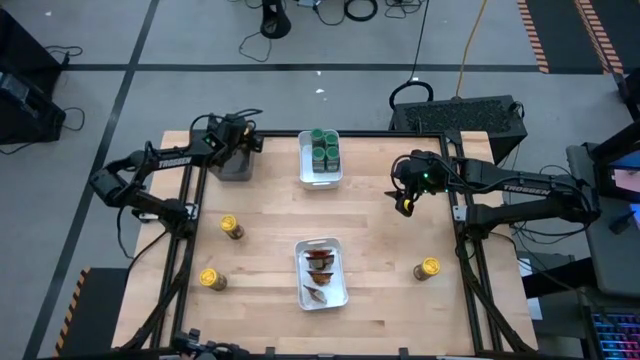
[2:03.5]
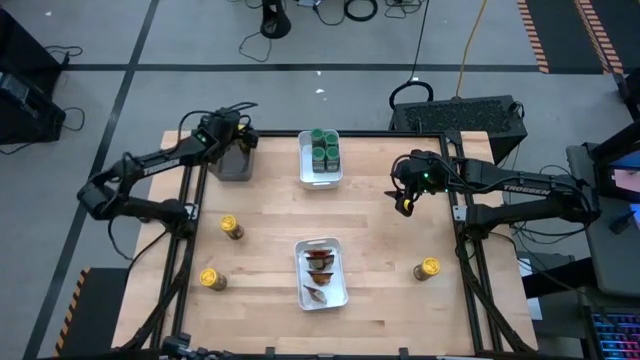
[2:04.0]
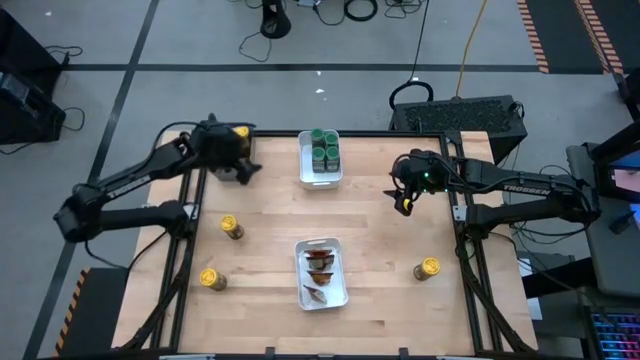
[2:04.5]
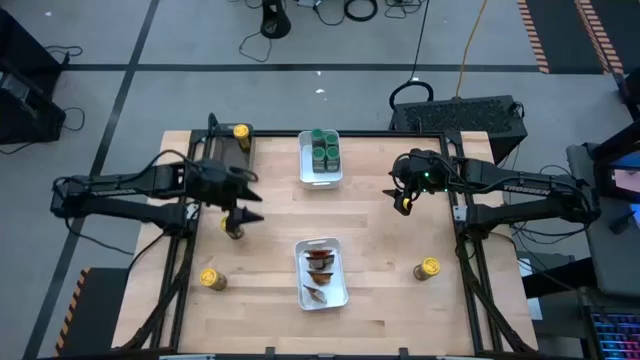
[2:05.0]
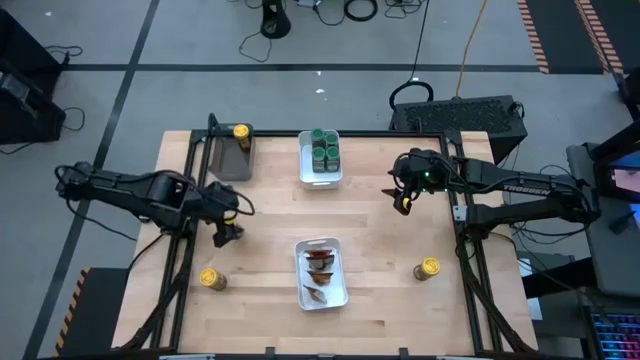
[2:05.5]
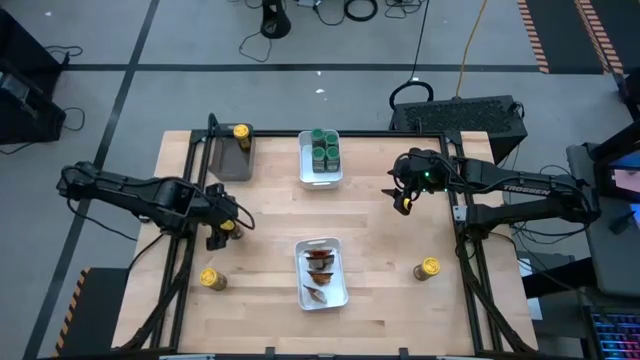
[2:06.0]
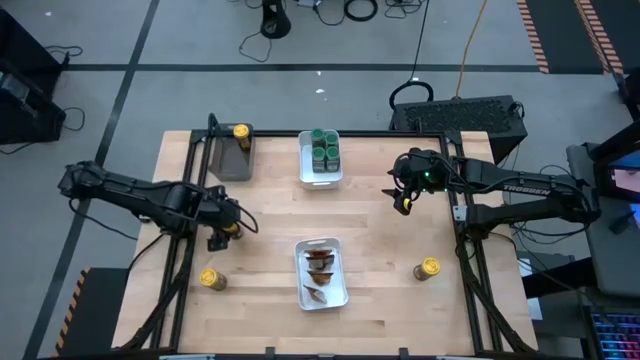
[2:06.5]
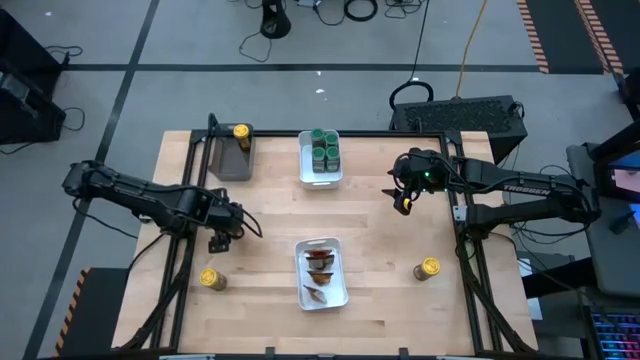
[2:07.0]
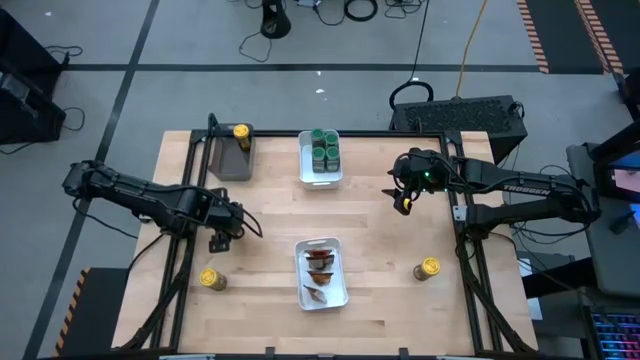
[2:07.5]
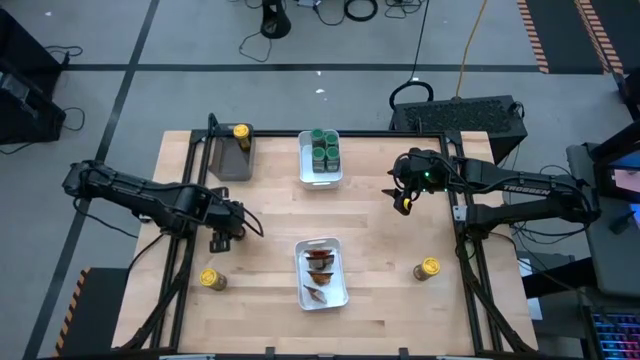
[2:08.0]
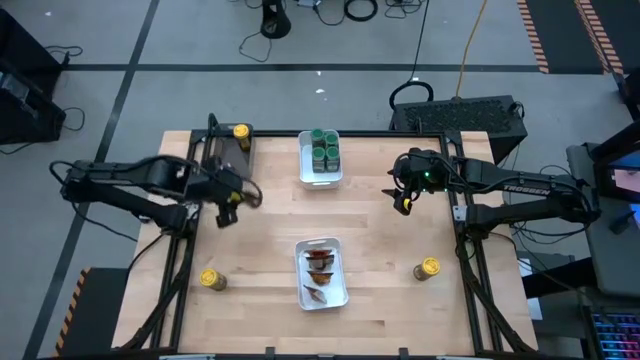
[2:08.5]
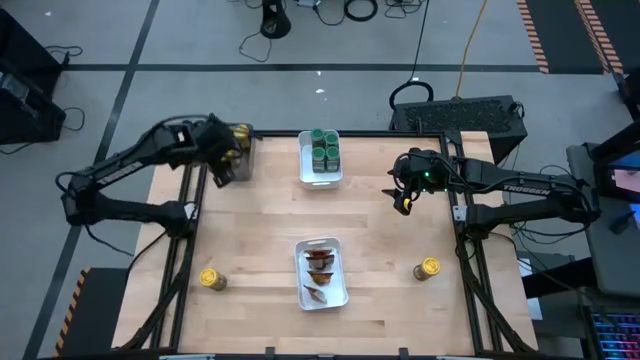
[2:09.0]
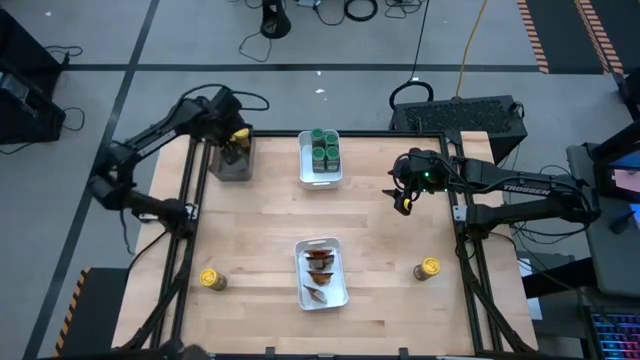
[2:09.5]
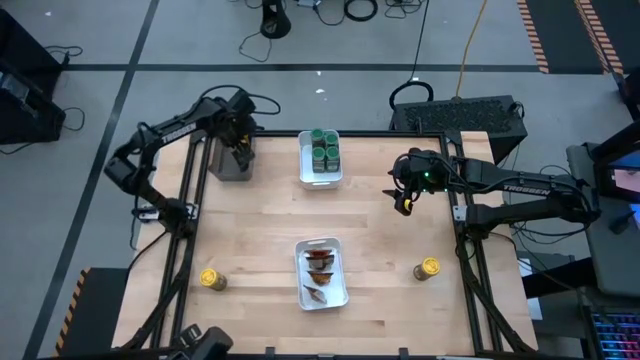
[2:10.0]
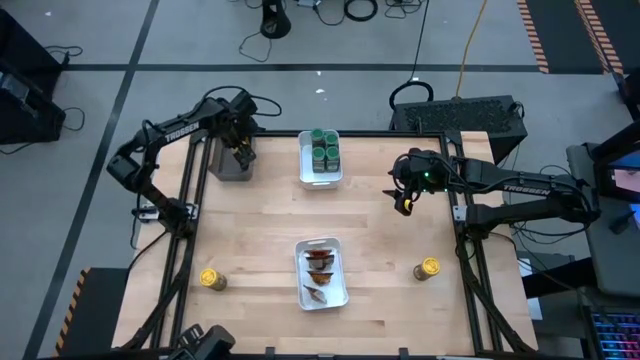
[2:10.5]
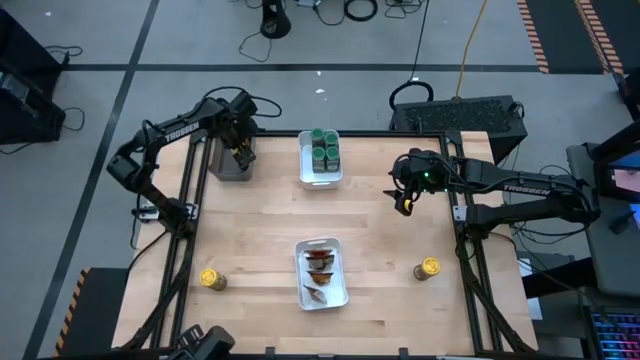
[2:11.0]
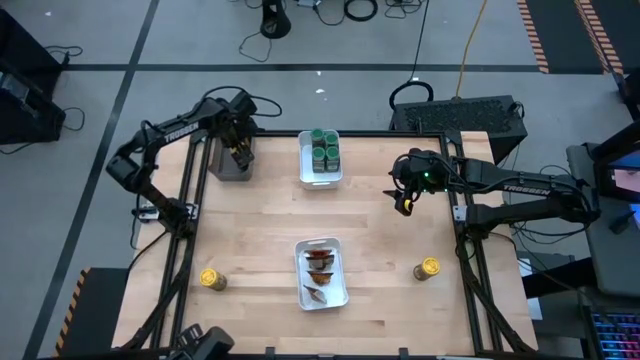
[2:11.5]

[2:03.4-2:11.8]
Task: Sort spices by type
Put the top left yellow spice bottle into the transparent black bin

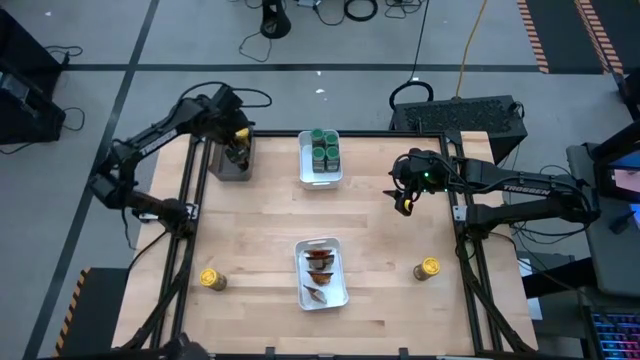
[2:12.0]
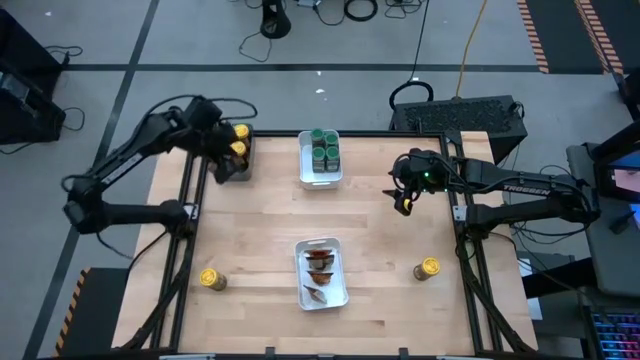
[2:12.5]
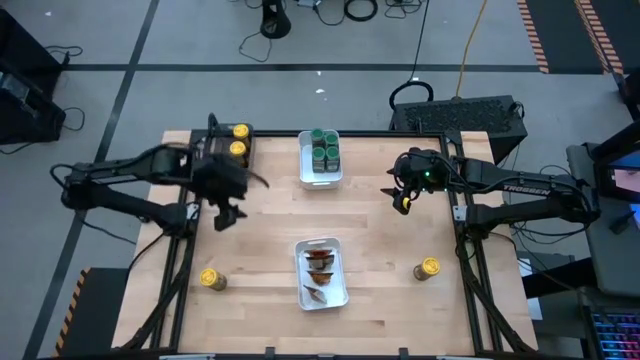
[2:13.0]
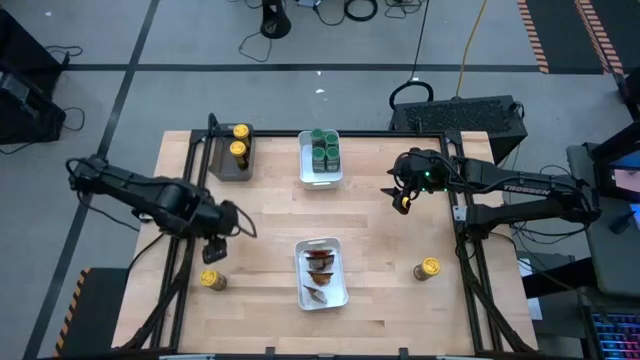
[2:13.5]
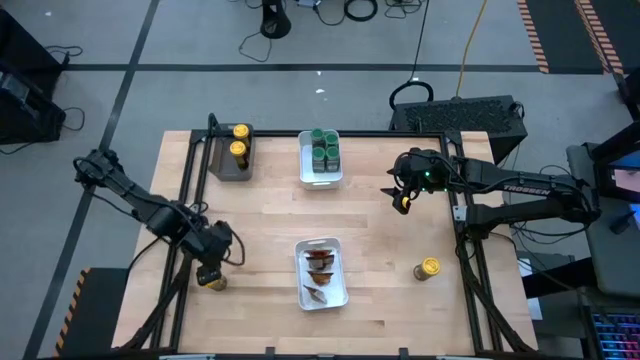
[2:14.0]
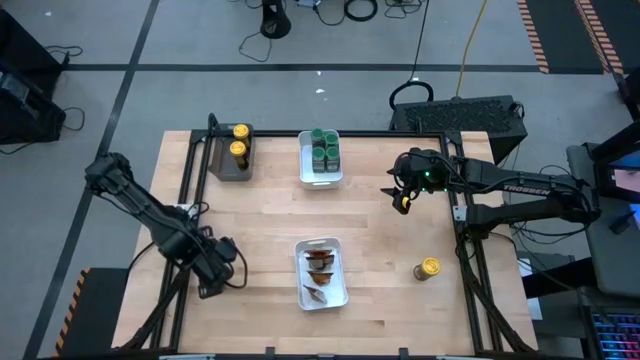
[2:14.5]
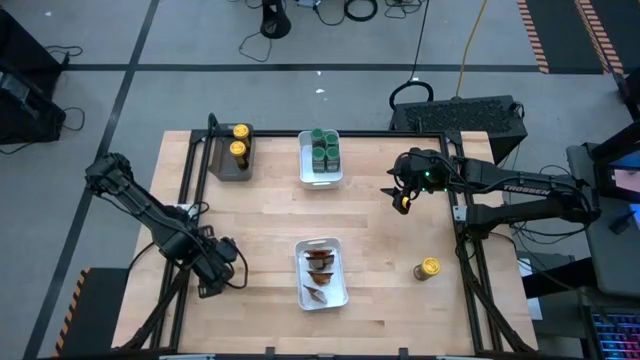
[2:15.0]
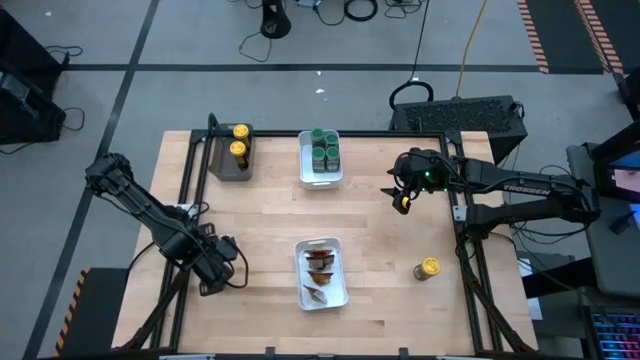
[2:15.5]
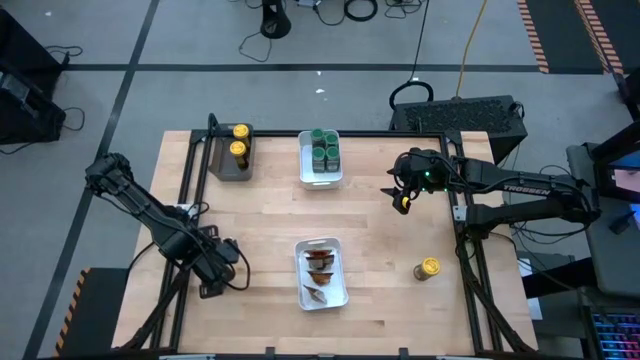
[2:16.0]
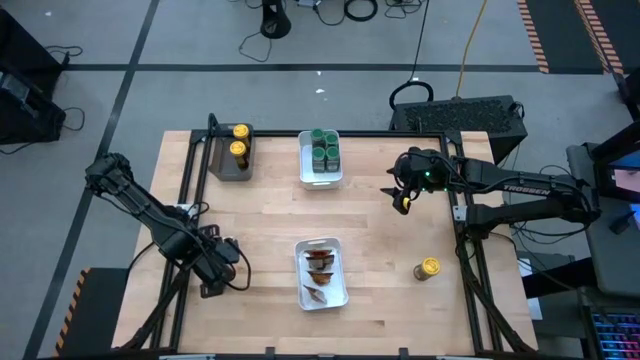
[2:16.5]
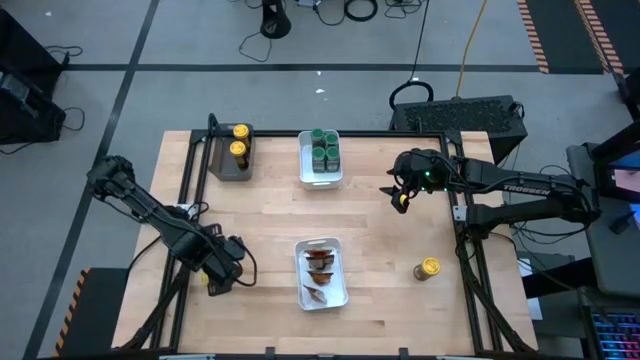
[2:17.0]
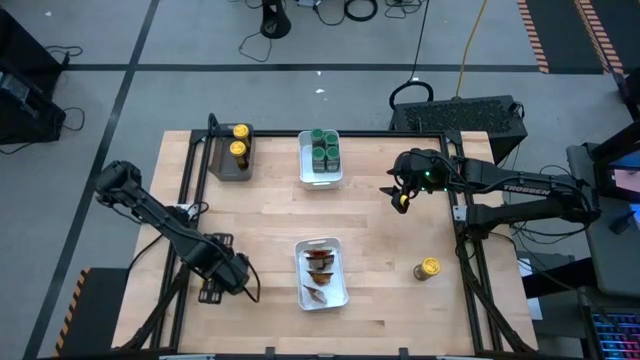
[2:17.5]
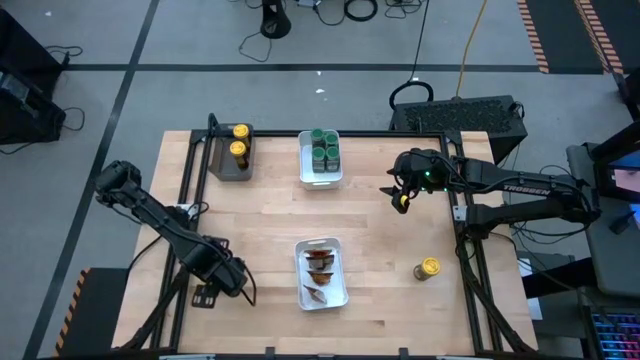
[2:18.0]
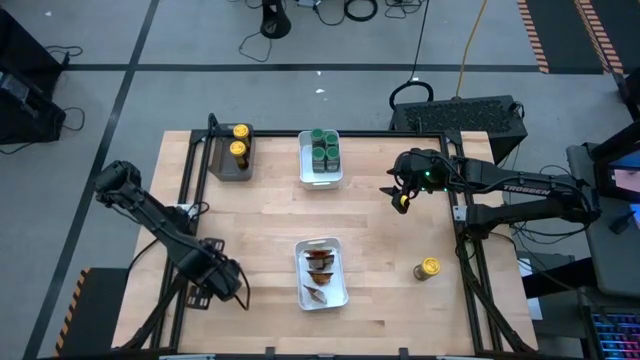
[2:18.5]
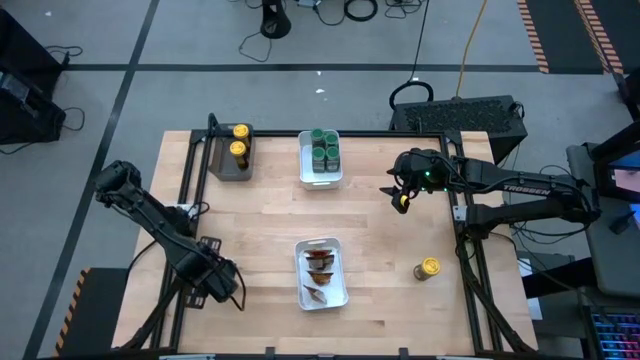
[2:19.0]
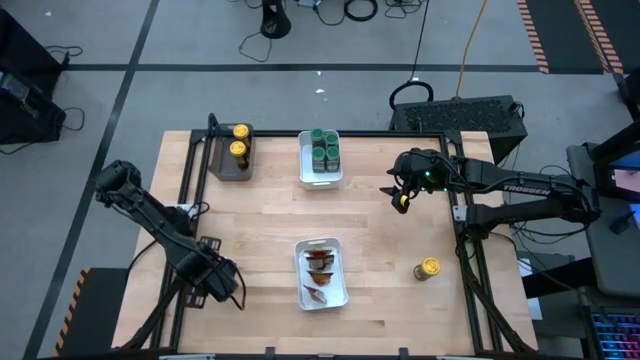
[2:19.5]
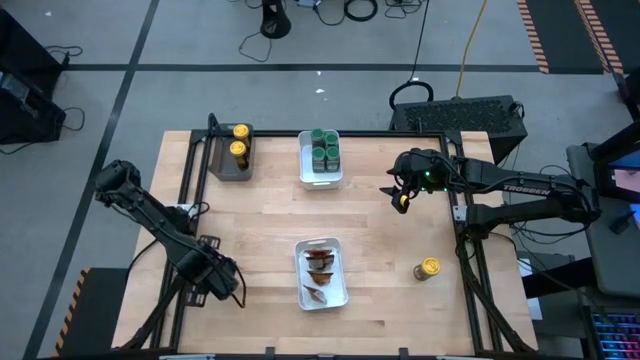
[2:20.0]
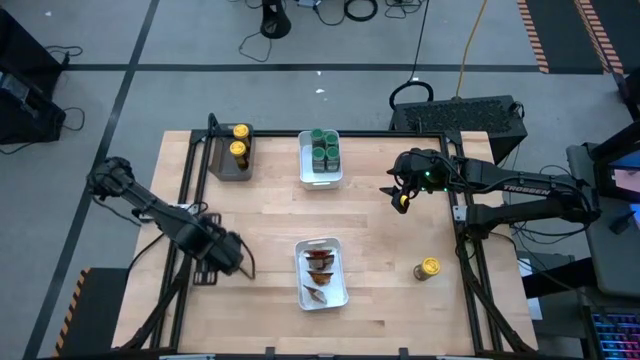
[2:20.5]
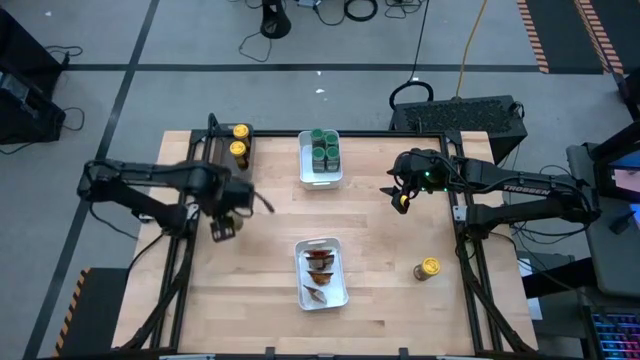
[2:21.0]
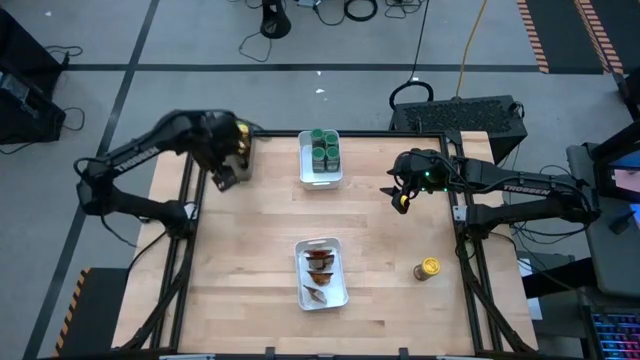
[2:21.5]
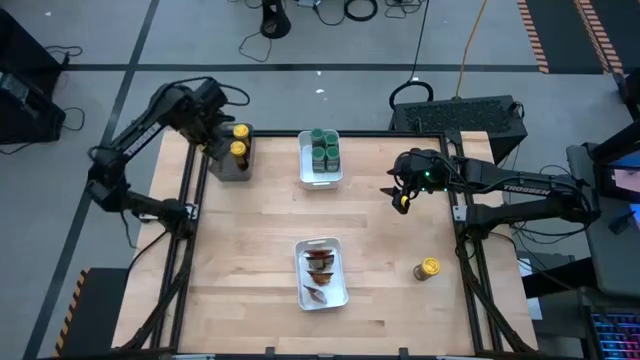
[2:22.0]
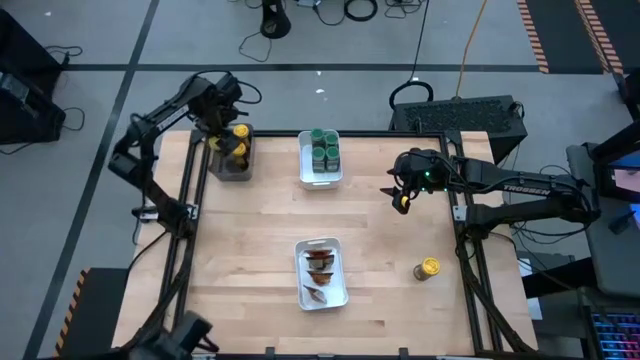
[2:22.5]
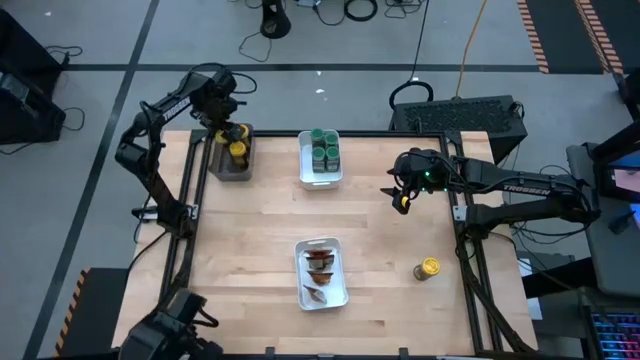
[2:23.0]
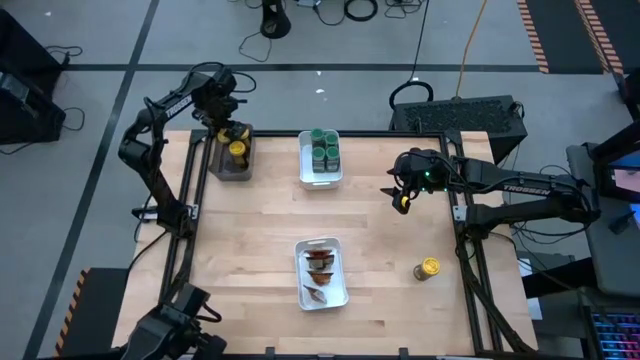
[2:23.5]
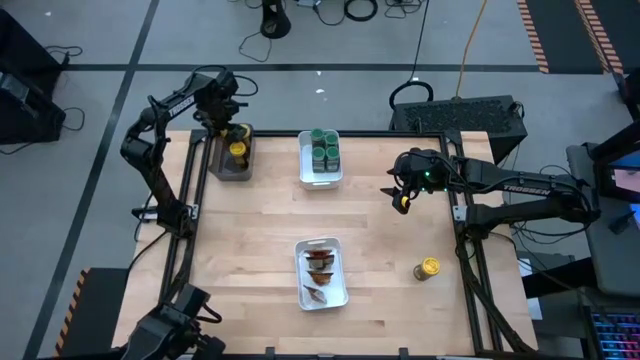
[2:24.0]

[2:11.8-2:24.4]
Put the left yellow spice bottle into the transparent black bin
